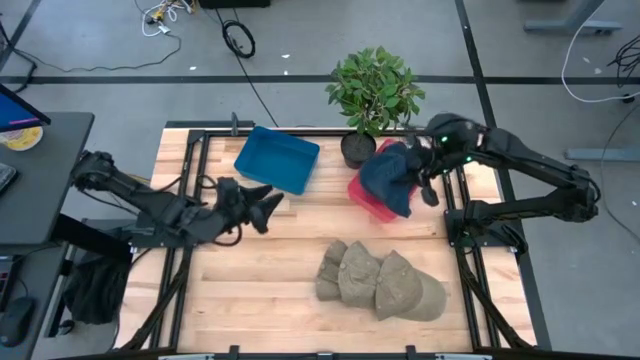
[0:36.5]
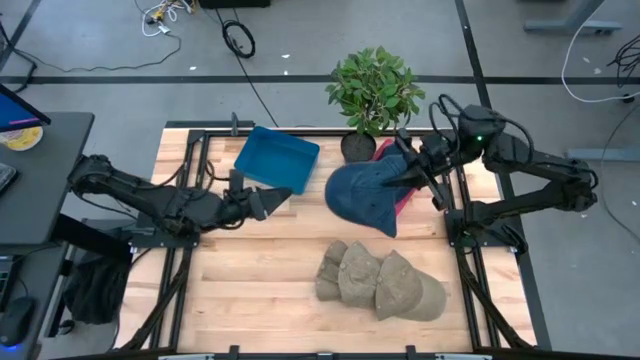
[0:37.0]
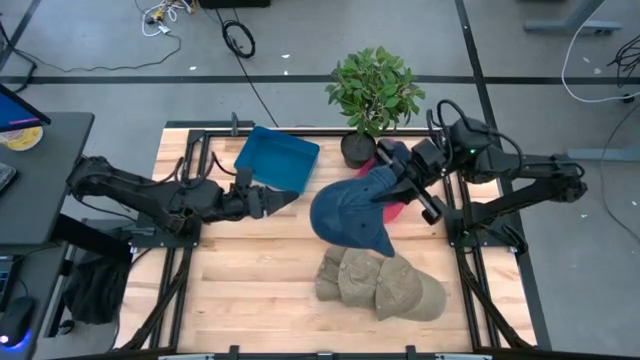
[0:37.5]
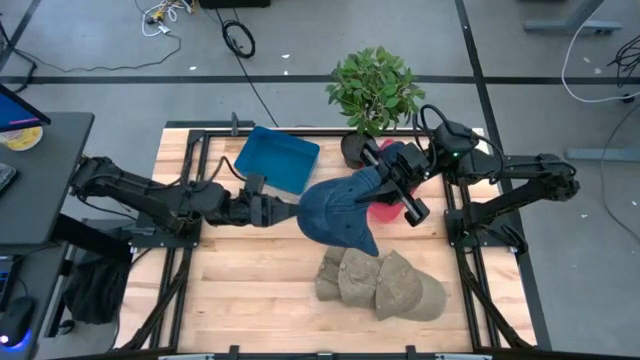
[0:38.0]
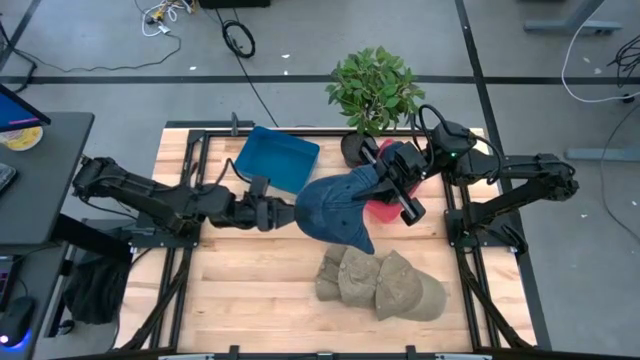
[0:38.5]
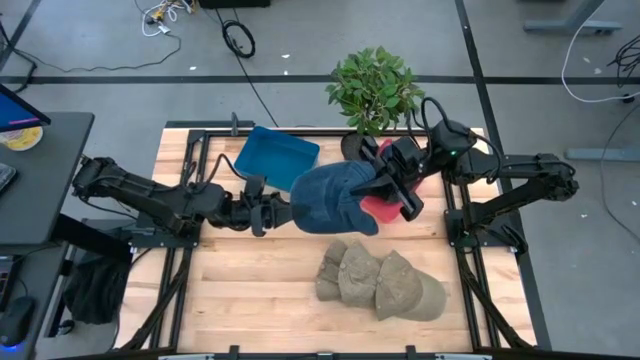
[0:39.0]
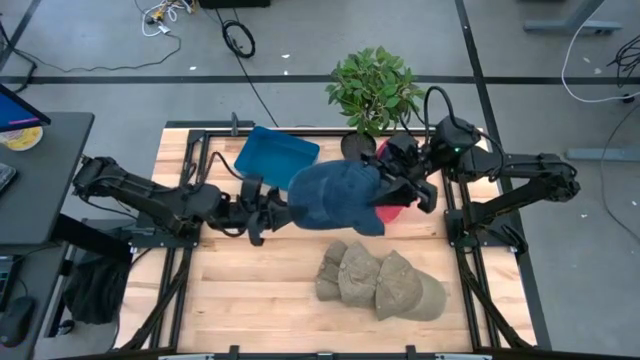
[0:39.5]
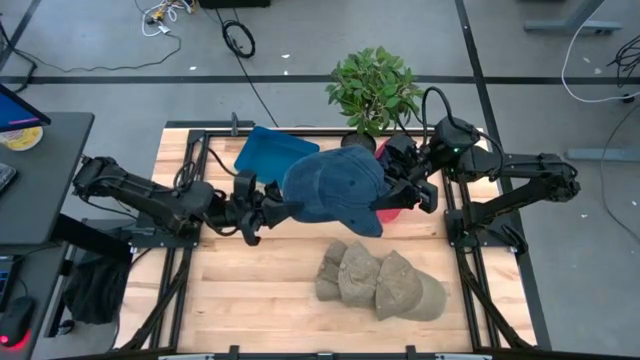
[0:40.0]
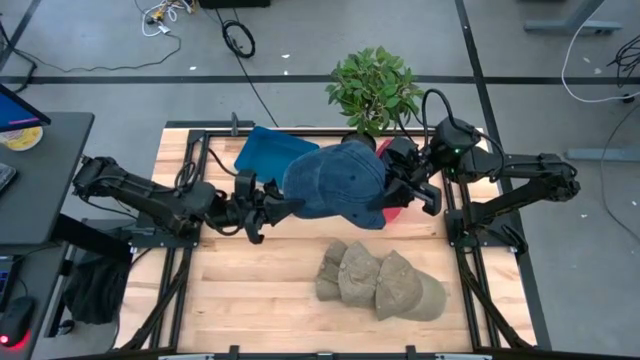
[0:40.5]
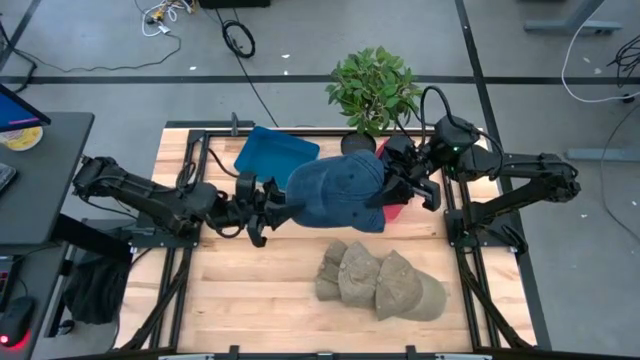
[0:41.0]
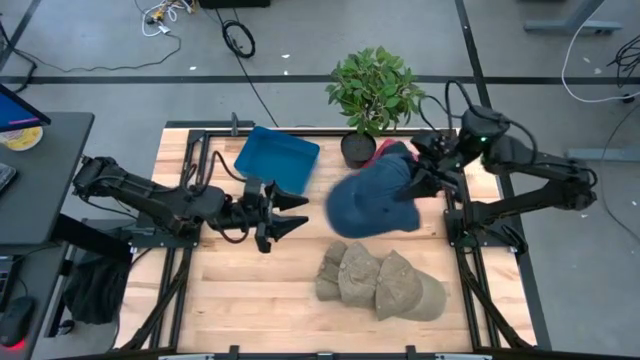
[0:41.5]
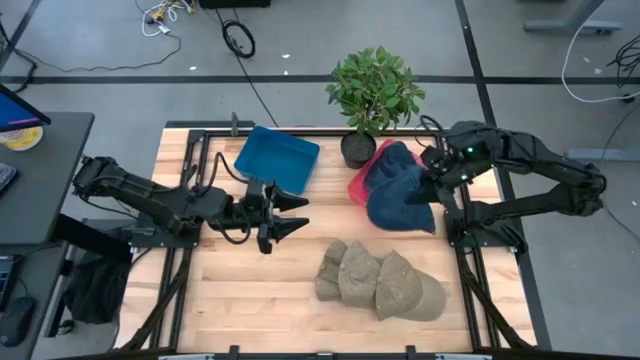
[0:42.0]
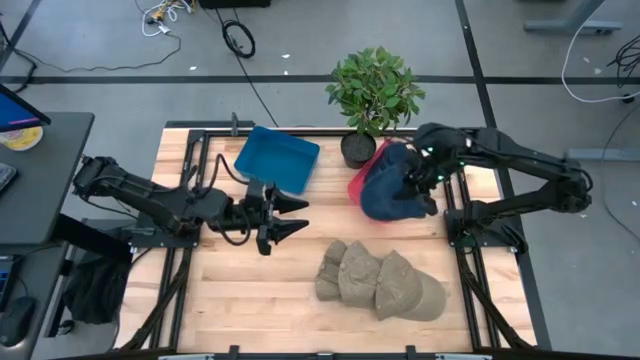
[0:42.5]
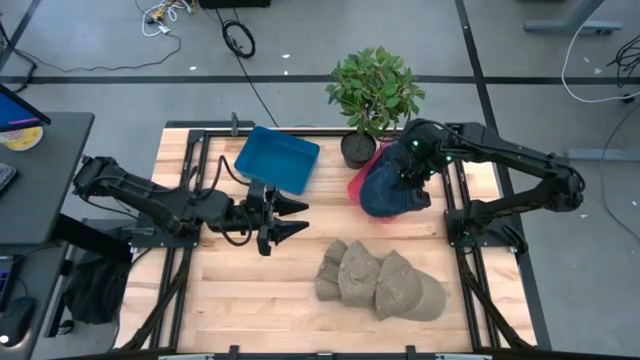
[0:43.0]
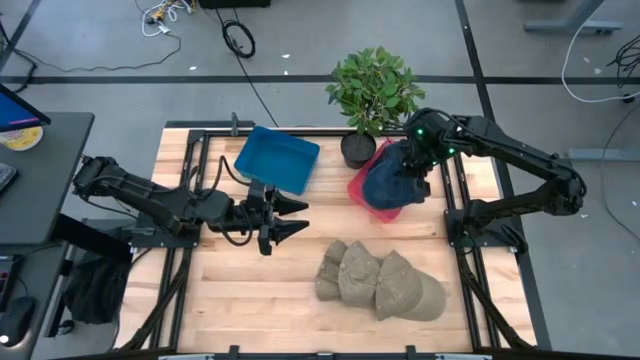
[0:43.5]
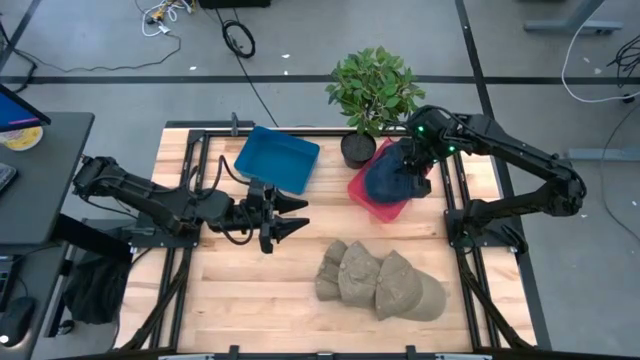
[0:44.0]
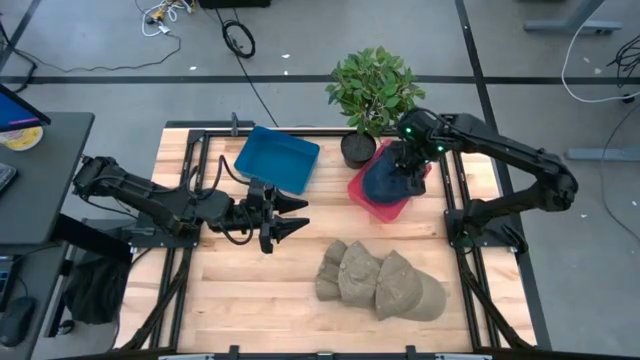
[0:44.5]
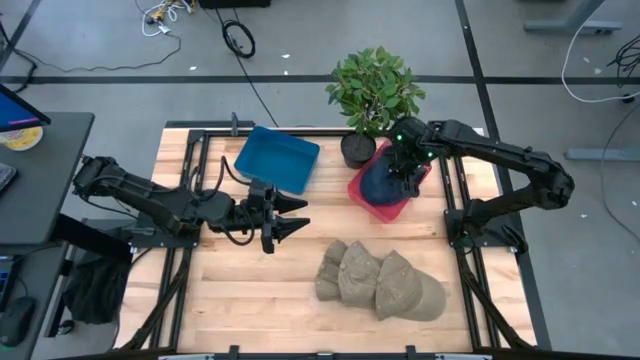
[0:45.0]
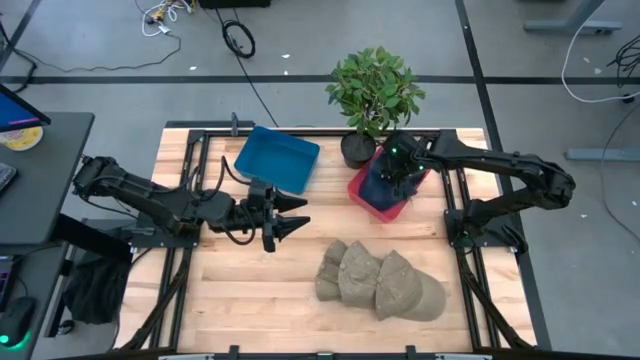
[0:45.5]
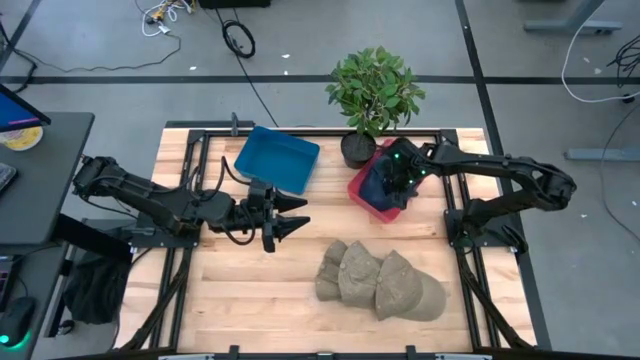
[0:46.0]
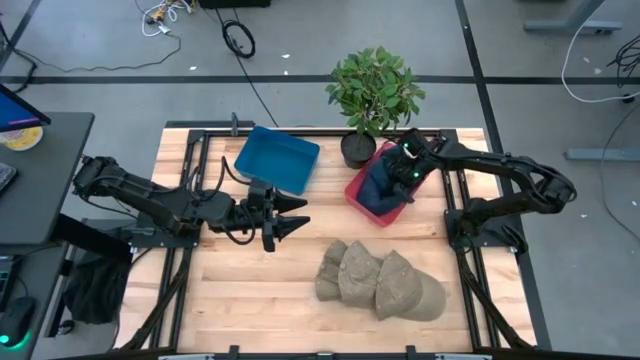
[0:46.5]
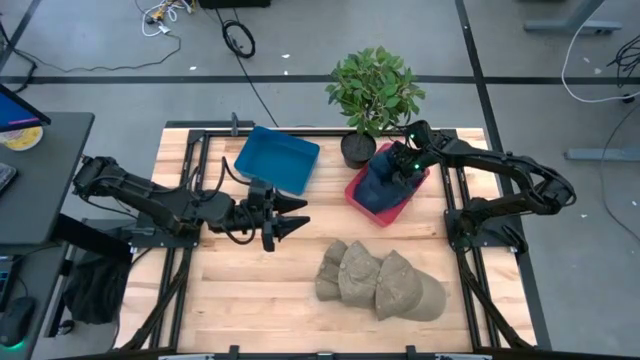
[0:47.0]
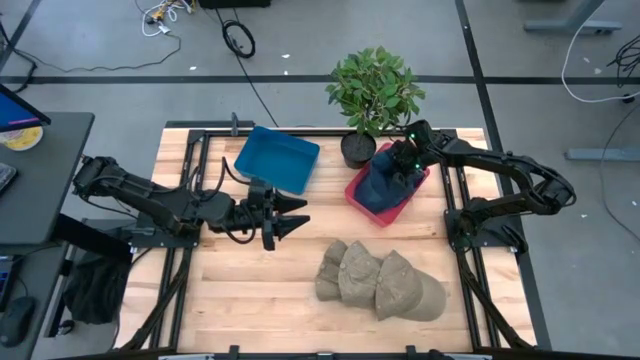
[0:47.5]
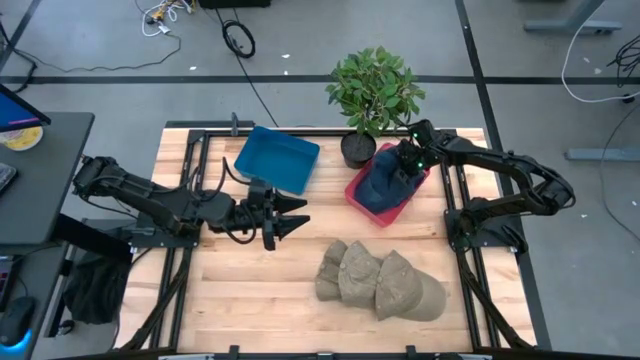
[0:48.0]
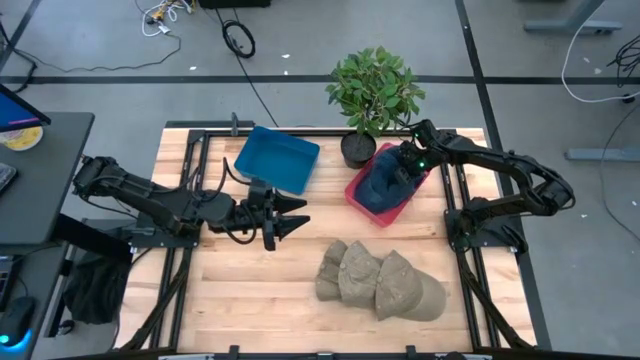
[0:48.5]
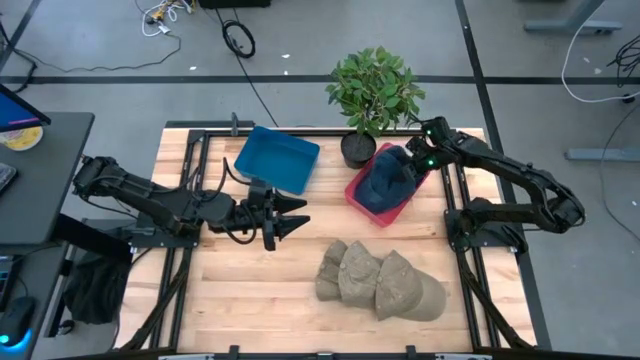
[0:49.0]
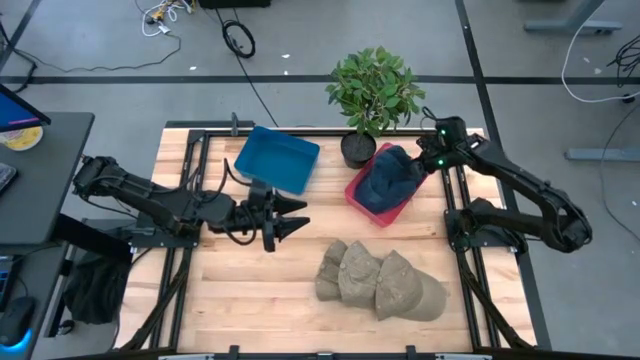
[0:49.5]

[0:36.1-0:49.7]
Task: Pick & Place hat
Put the blue cap into the red bin

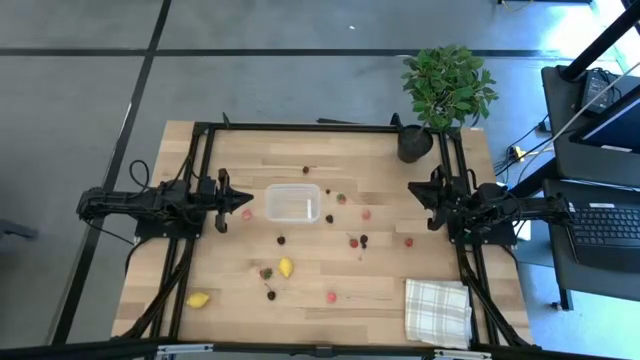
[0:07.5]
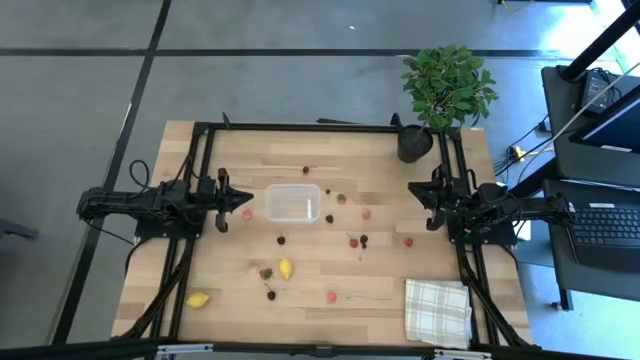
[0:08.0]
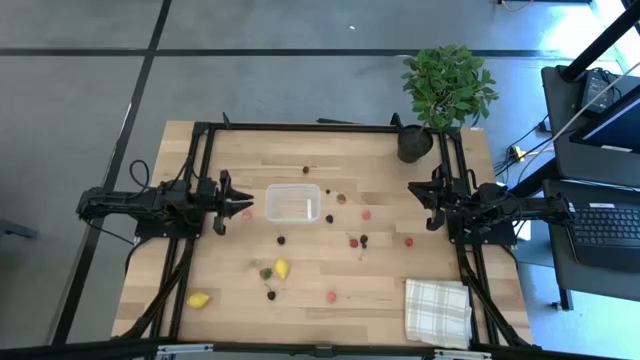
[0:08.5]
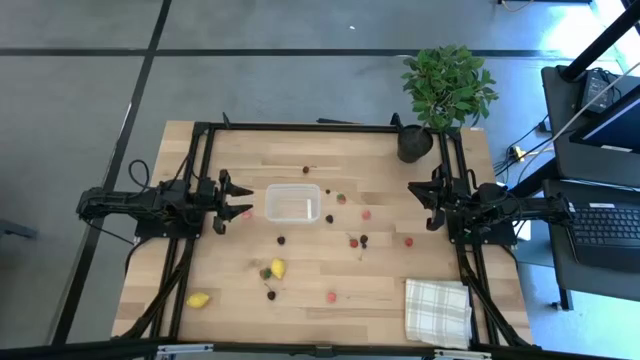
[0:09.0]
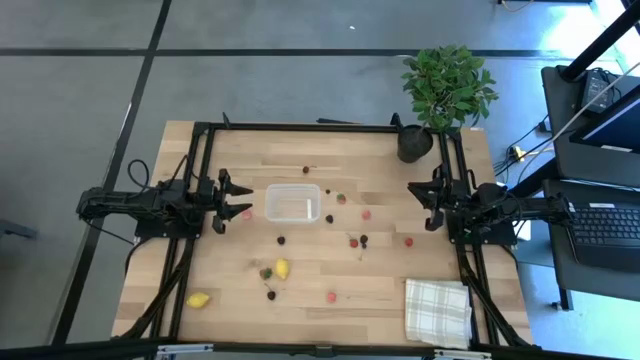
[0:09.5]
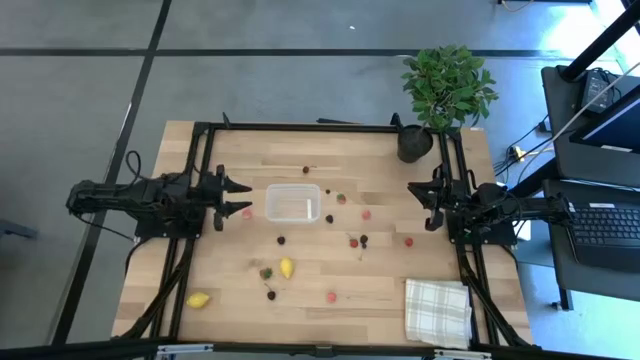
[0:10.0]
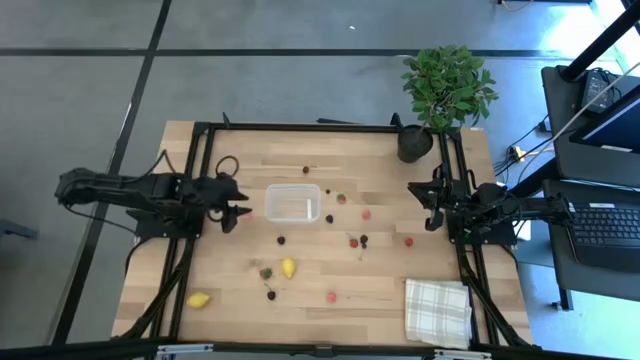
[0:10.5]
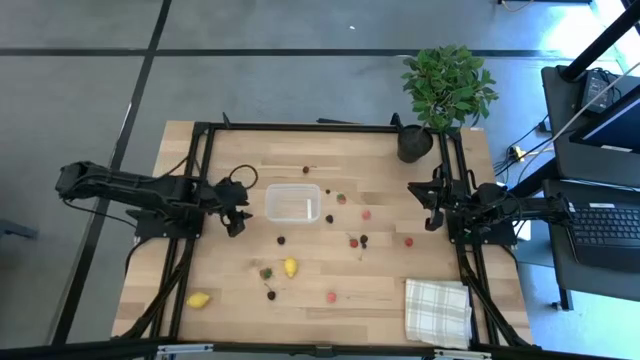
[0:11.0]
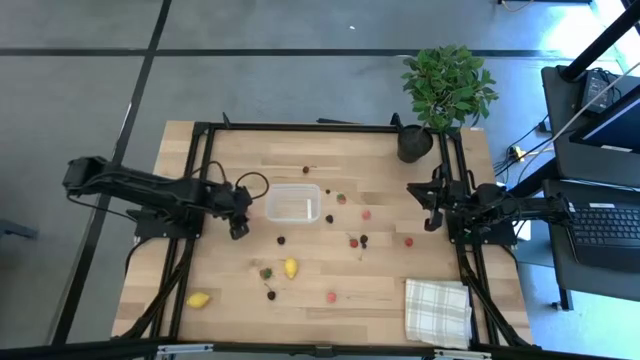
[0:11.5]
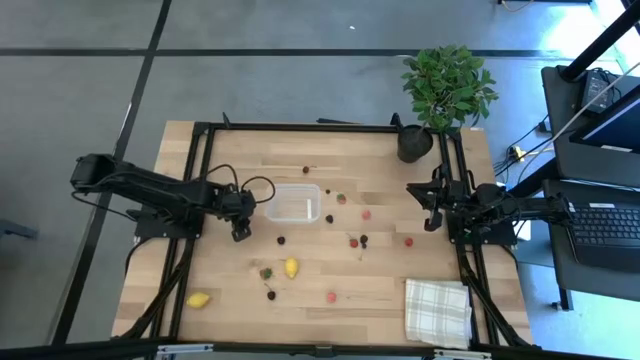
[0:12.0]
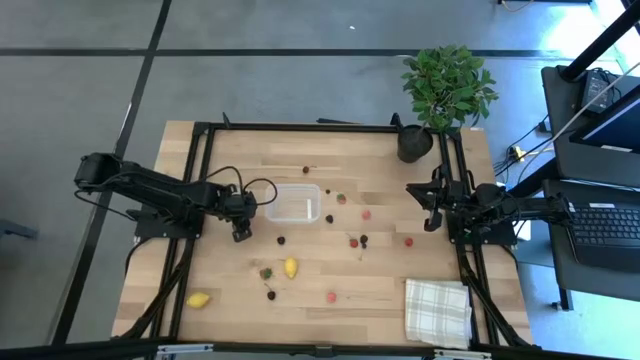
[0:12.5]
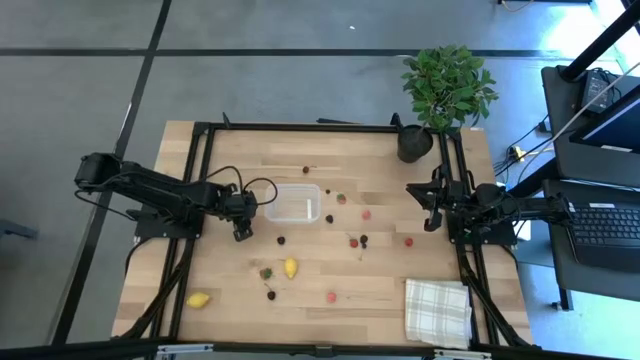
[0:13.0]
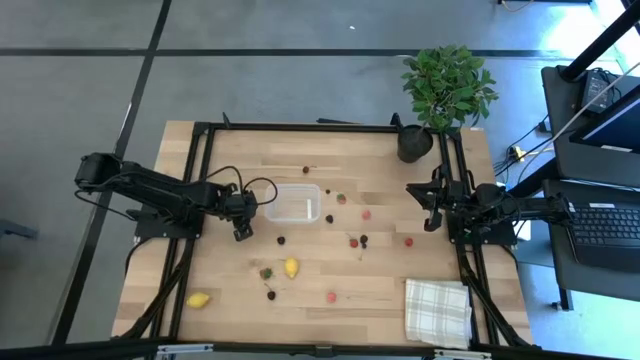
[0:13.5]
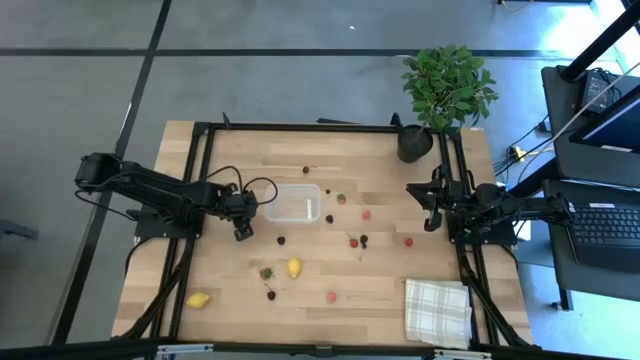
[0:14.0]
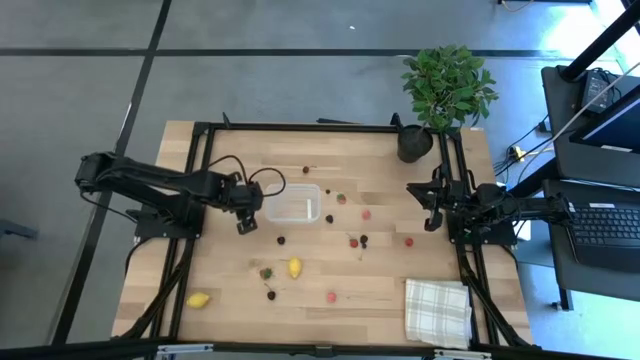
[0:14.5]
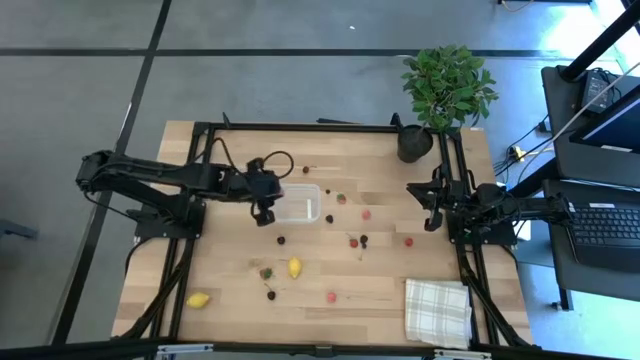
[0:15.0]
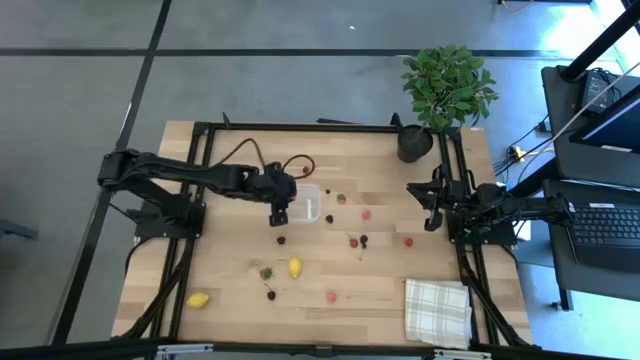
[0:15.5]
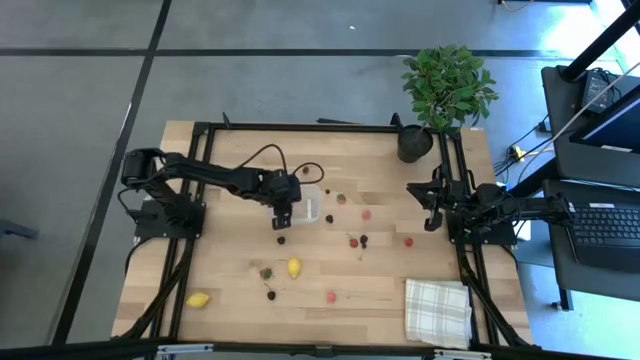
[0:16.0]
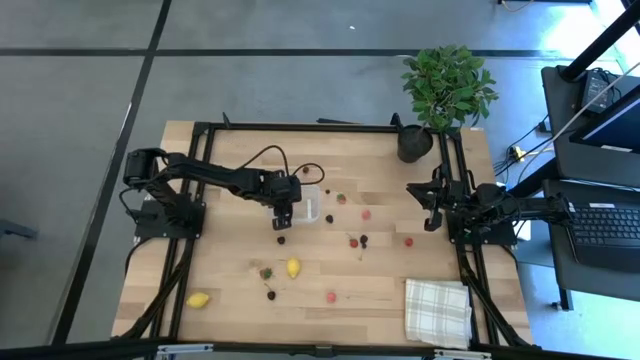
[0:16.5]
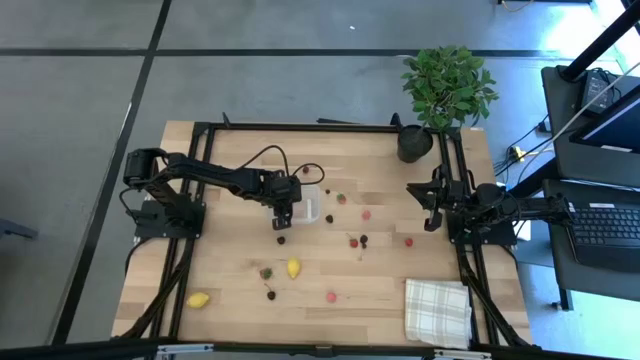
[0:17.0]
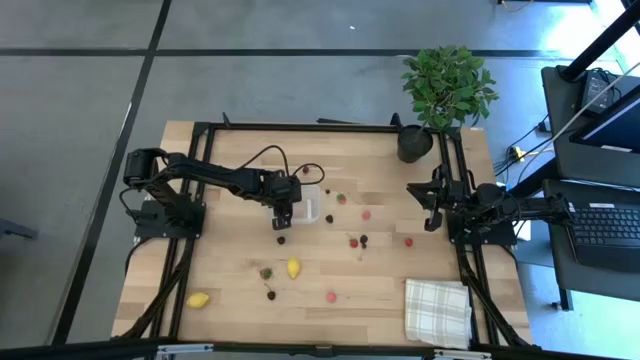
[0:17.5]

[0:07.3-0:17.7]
Task: Pick and placing Produce into tupperware
Put the top left apricot into the transparent bin
